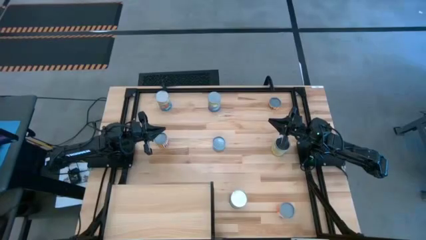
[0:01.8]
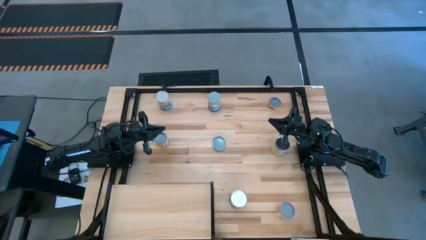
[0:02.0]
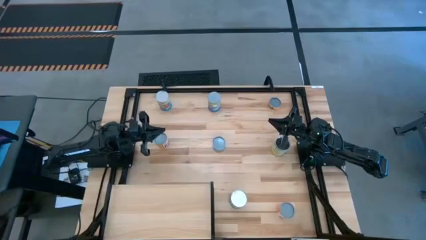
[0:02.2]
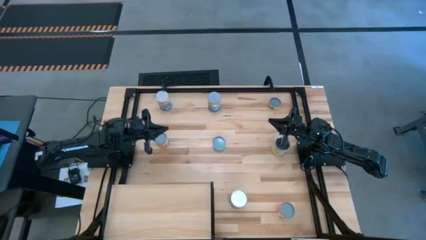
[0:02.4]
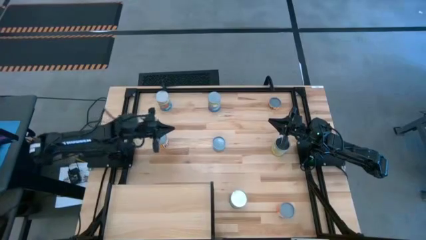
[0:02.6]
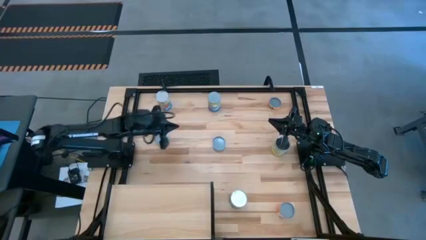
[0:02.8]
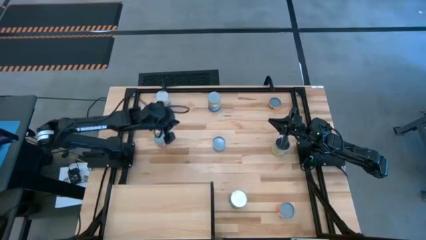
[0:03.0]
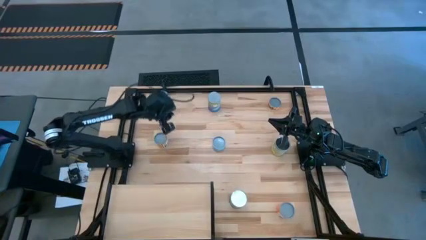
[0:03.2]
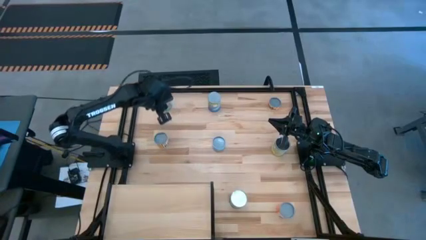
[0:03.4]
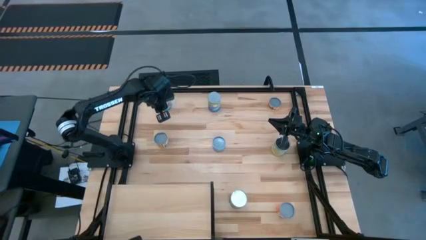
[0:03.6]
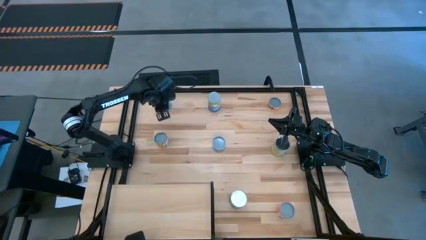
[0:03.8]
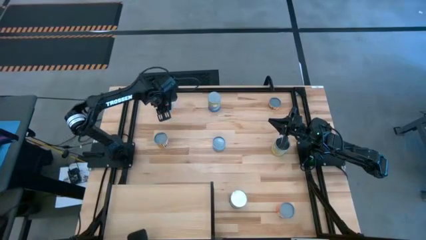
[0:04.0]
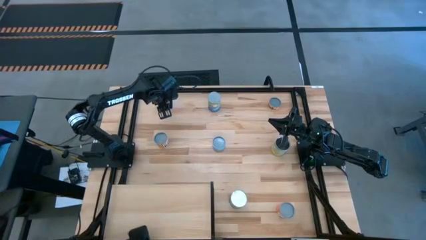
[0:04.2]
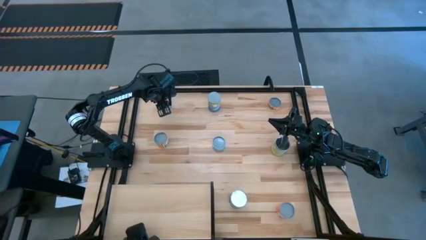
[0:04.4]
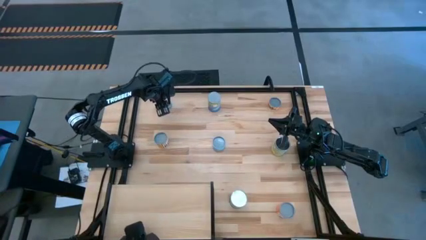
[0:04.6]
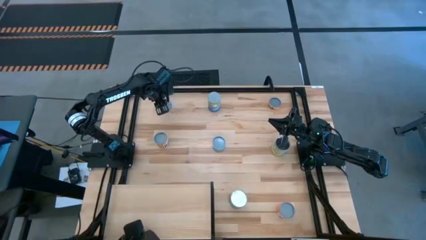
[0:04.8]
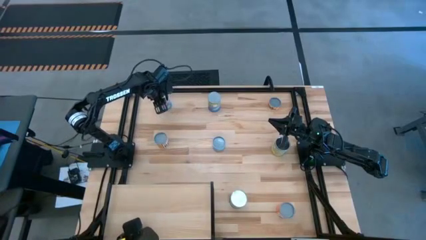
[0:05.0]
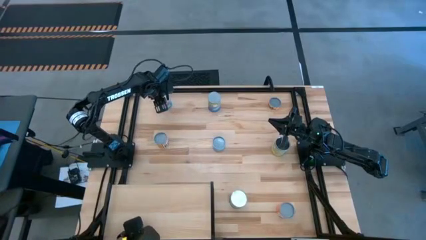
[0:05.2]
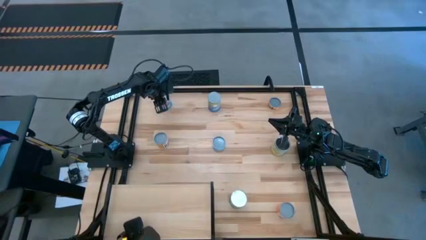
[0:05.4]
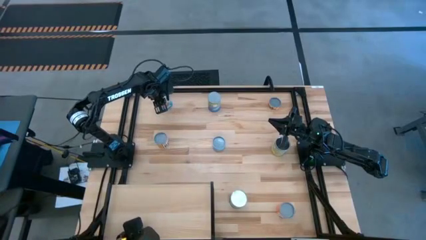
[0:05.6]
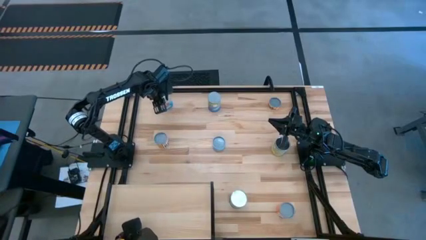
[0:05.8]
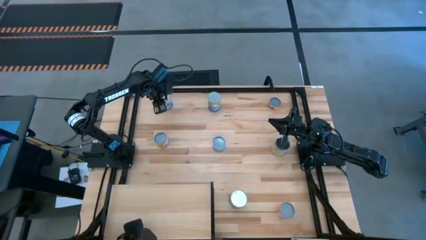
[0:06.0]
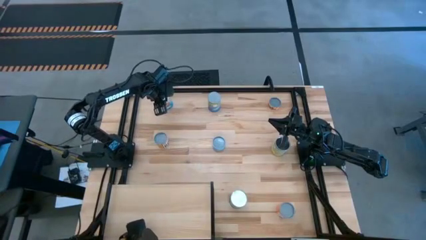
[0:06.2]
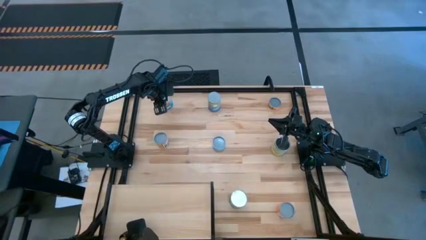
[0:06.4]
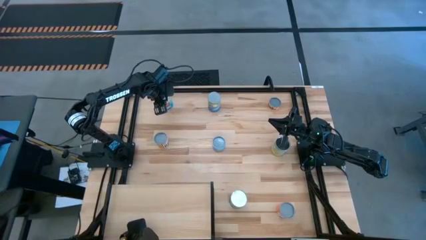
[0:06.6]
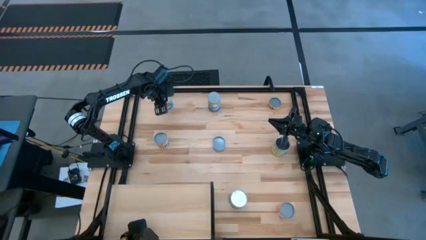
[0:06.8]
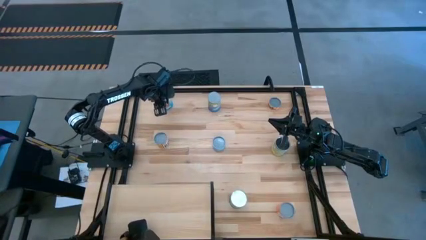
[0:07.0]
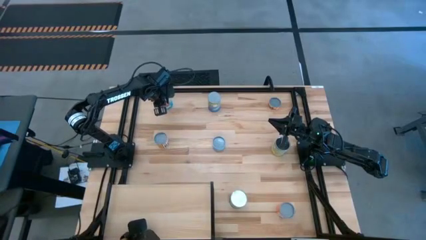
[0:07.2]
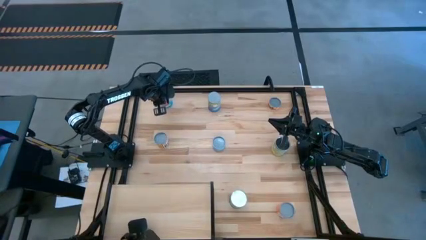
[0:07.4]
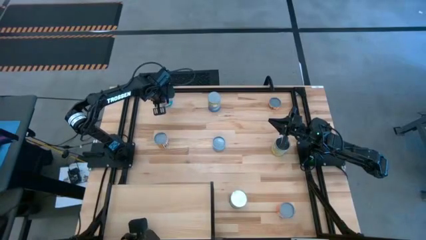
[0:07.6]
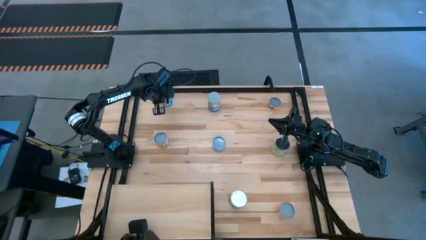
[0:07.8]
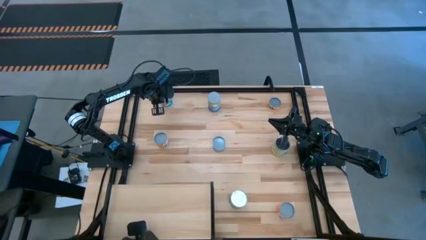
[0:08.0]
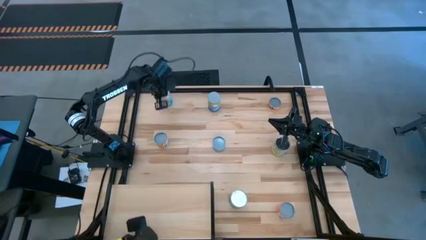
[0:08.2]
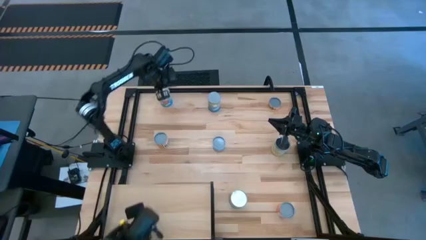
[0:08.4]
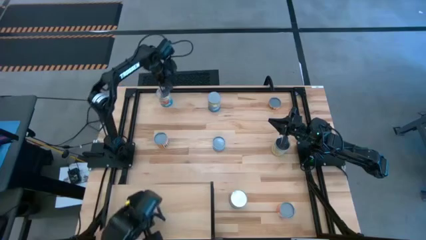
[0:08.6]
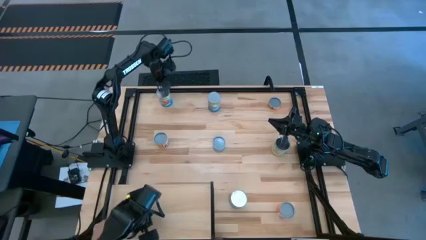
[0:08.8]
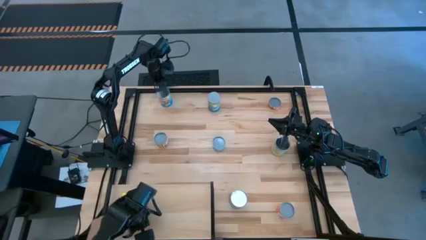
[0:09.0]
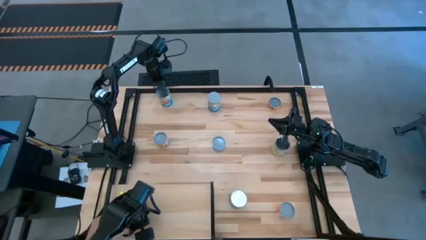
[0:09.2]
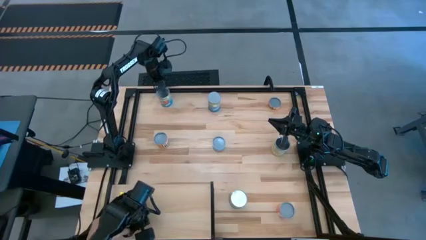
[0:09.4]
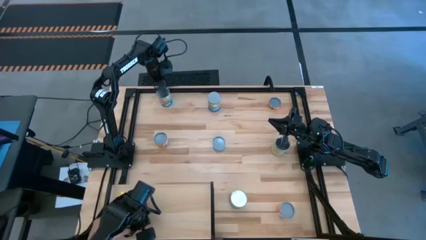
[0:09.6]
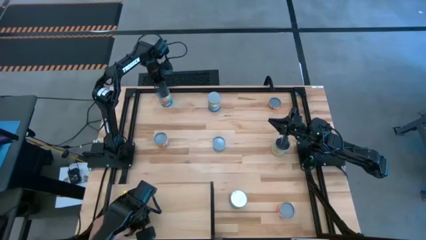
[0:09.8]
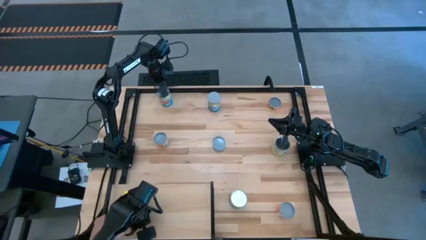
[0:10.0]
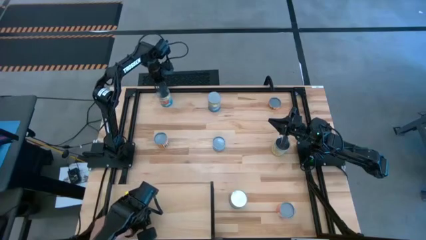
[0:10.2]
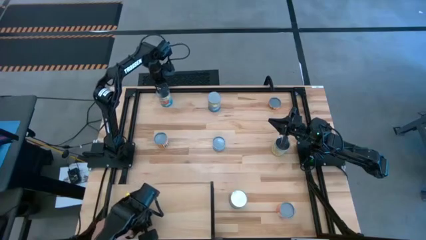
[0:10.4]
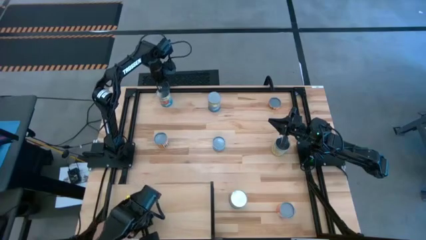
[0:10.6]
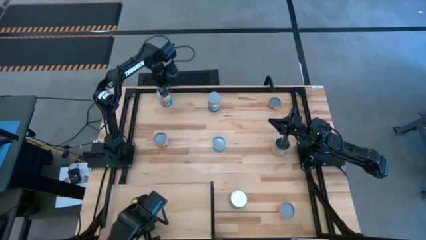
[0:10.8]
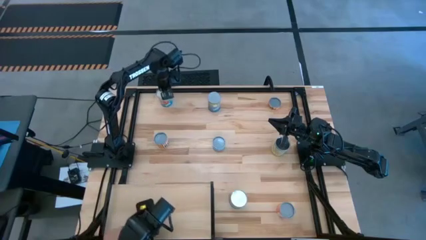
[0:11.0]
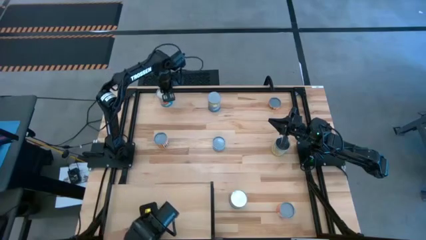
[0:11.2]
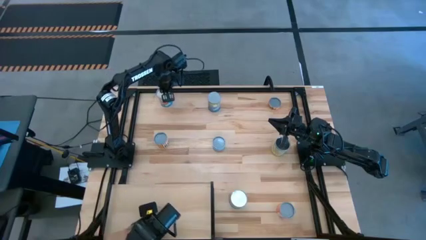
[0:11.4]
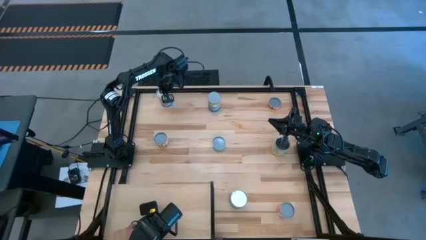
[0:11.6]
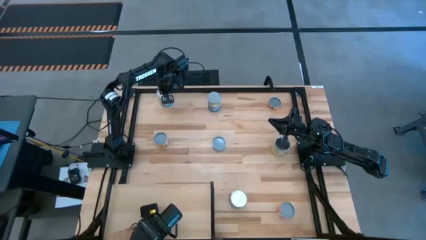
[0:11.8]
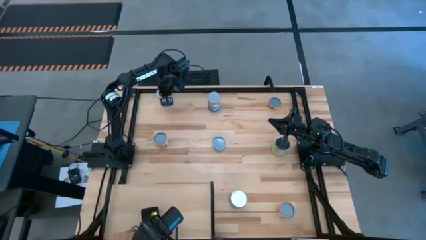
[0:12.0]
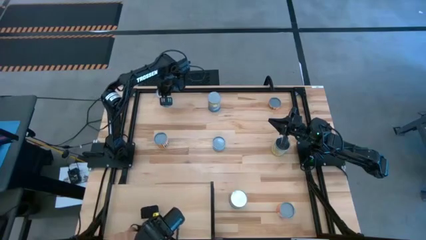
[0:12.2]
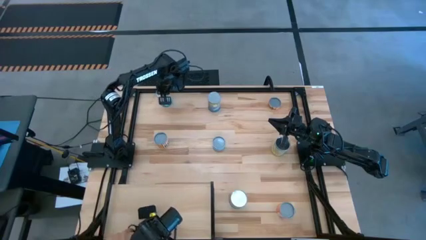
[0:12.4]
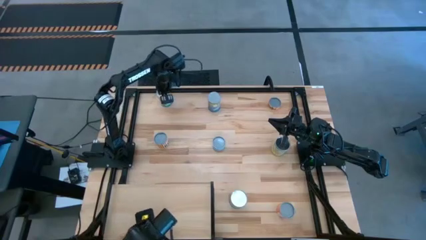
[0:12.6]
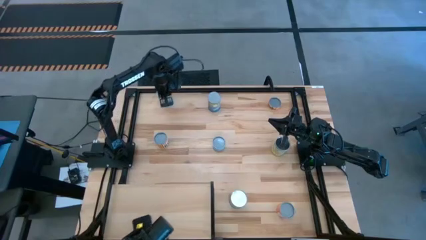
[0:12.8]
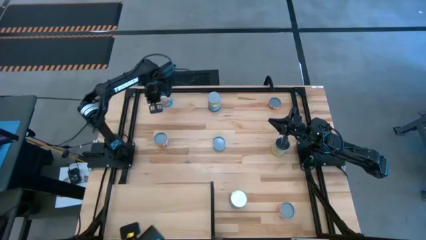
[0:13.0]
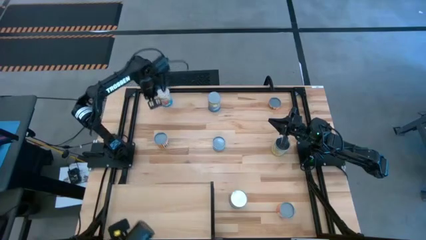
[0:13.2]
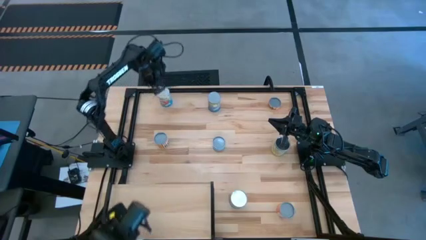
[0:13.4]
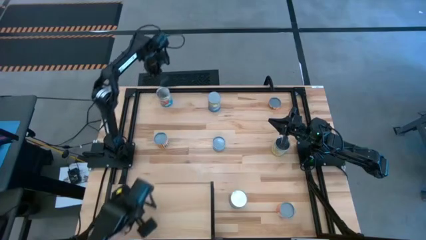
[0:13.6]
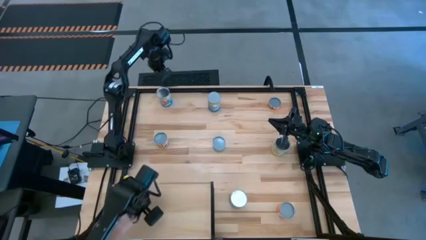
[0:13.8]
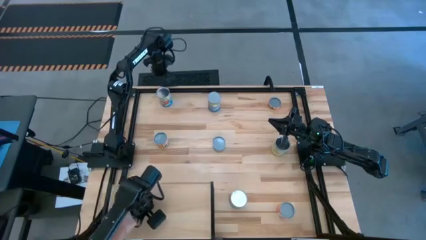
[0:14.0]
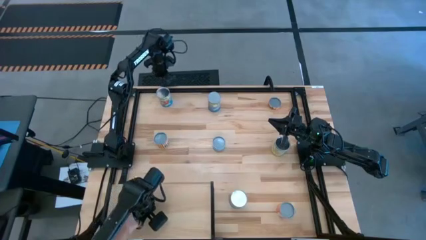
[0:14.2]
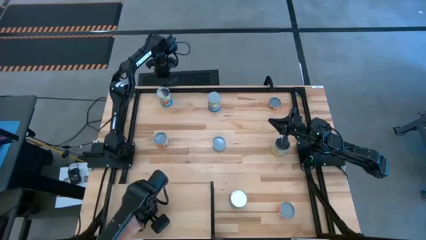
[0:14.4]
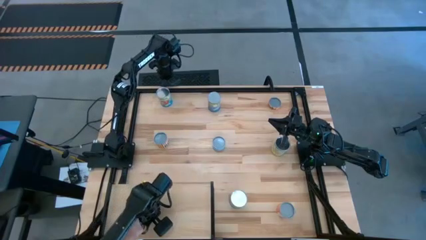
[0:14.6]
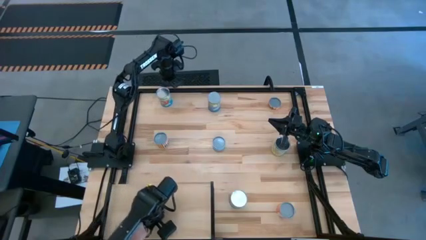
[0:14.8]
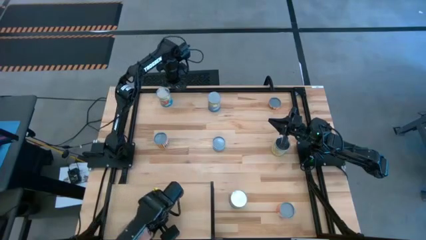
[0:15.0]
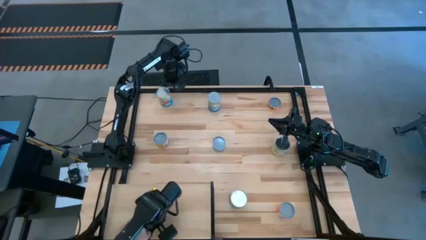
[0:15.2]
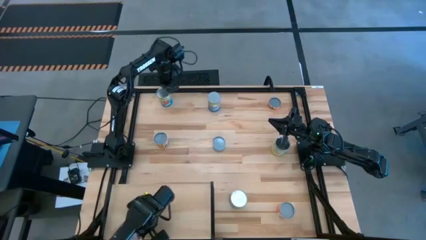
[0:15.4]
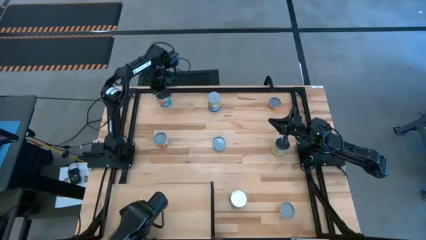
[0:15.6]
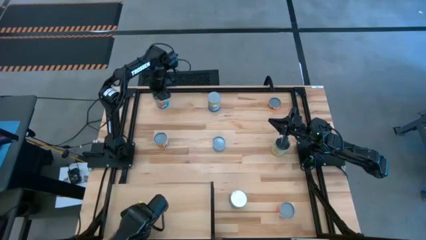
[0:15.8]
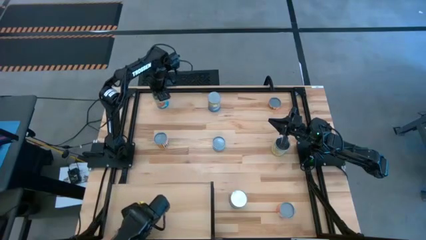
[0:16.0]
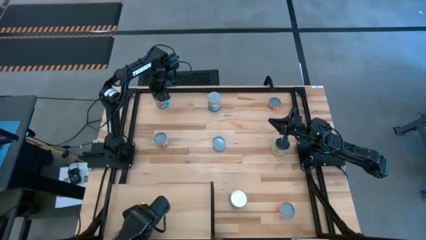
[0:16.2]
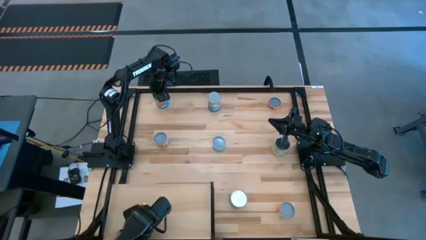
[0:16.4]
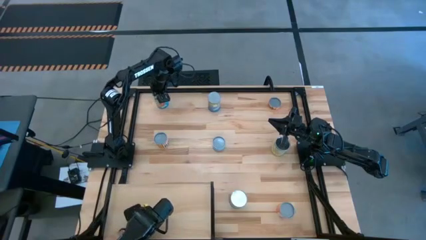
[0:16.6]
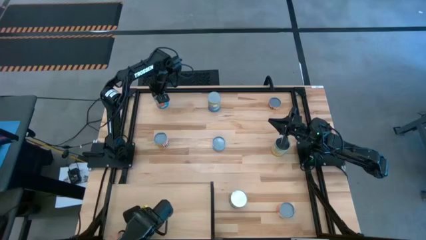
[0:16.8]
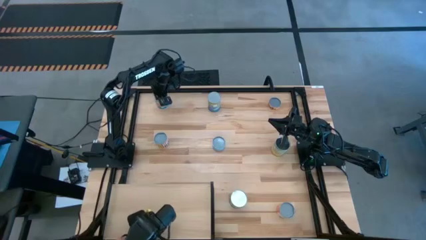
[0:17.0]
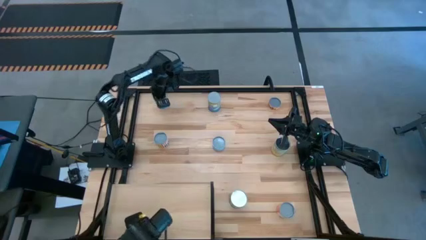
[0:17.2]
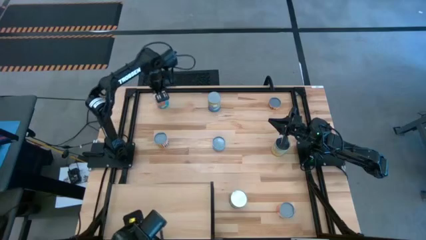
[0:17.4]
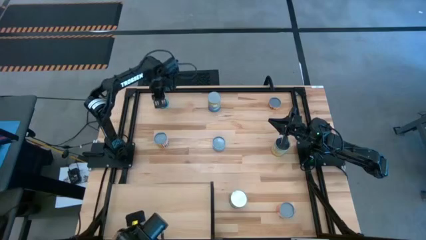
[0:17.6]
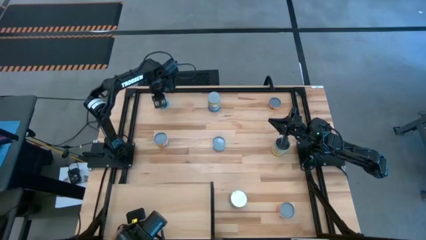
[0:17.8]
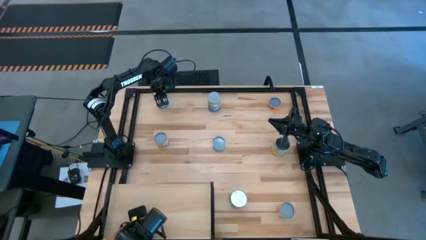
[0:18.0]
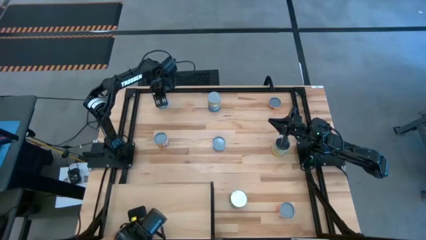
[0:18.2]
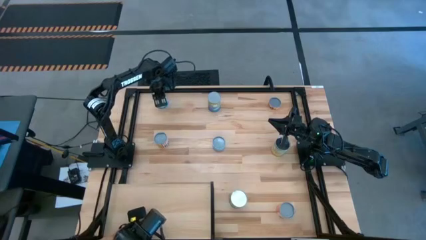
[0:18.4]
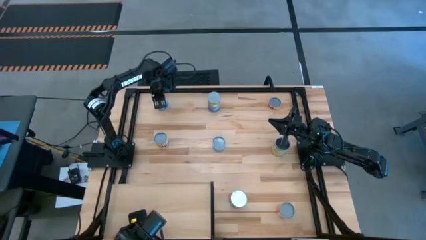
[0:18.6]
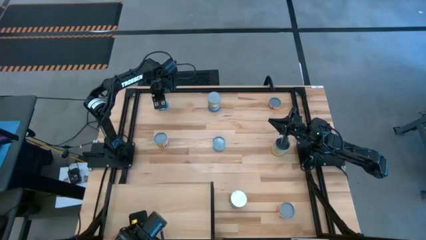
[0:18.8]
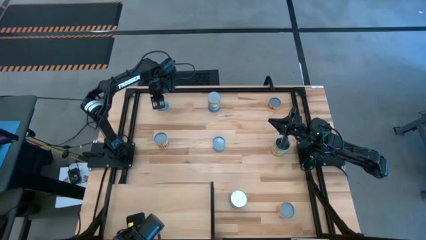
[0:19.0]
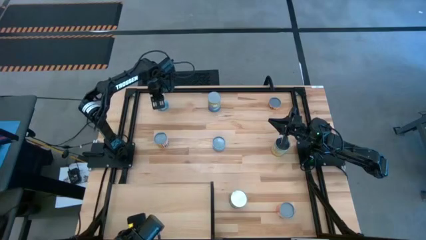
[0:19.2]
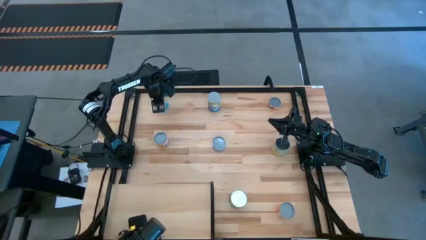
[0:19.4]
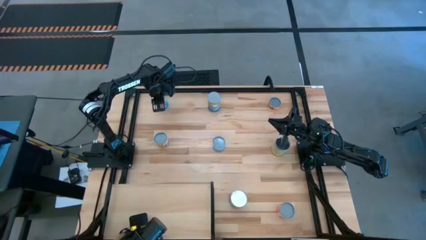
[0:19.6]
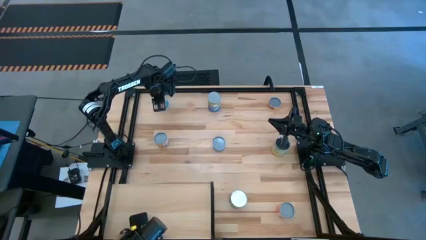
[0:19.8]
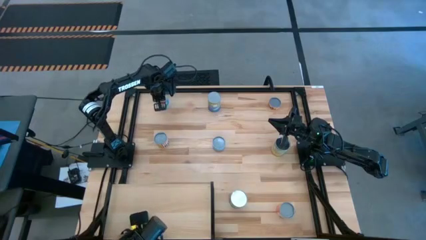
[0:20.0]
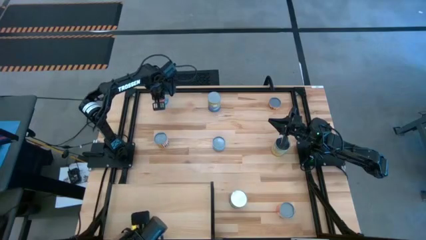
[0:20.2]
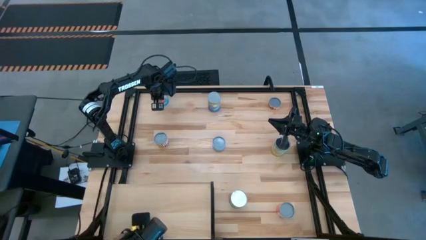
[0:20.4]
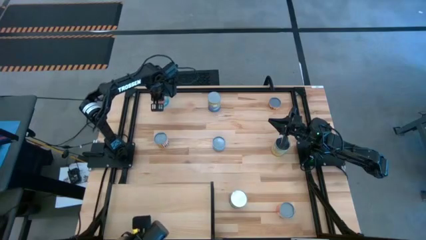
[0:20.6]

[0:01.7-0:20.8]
Task: Pick and place cans onto a shelf
Put the canned tomatoes on the shelf
